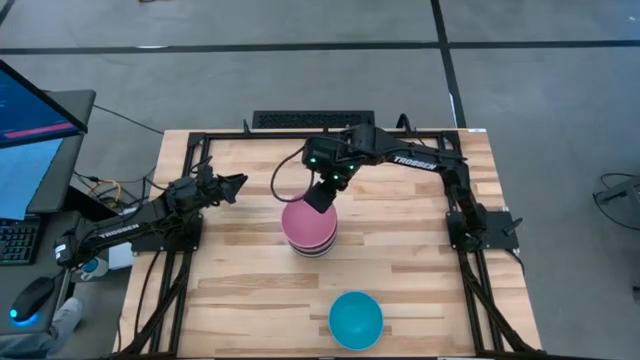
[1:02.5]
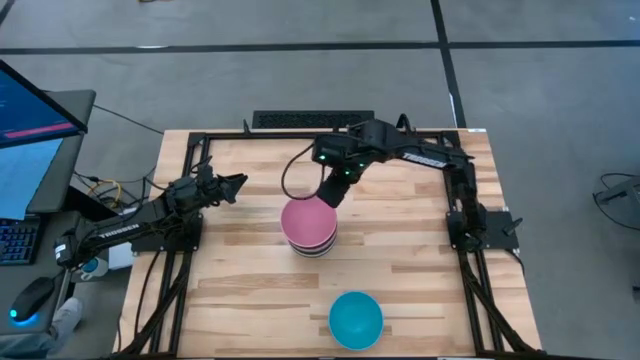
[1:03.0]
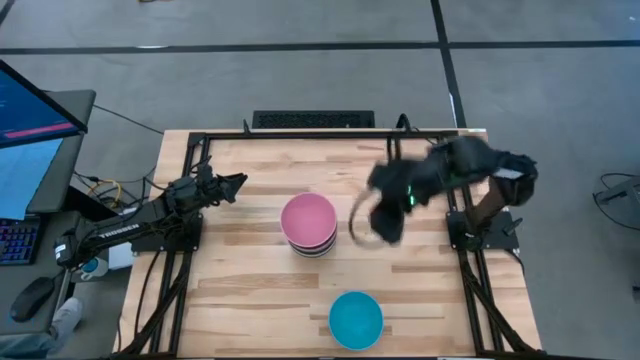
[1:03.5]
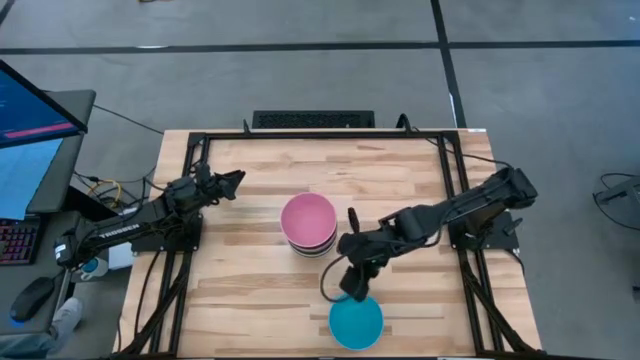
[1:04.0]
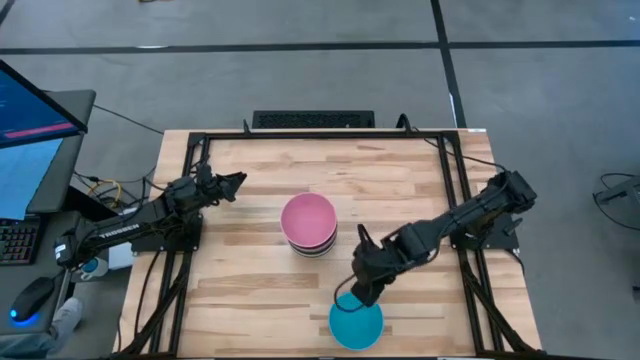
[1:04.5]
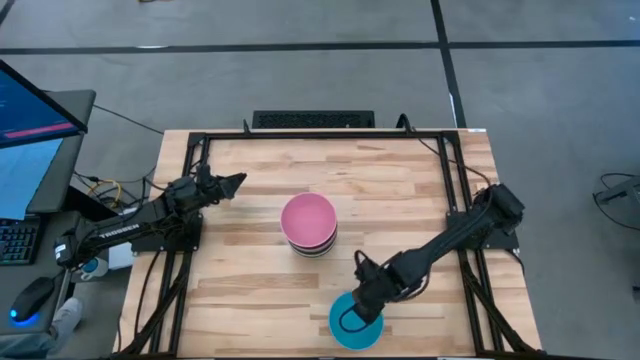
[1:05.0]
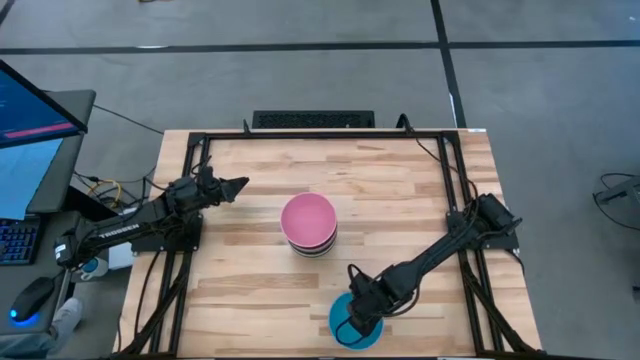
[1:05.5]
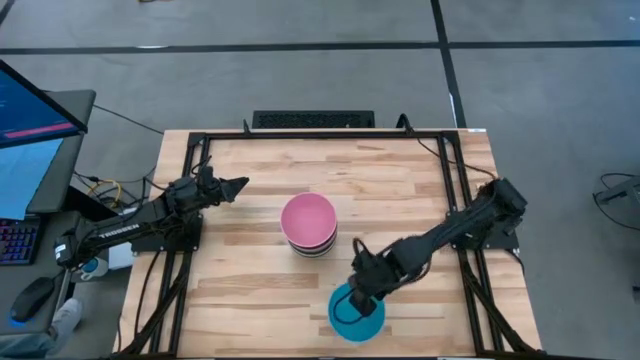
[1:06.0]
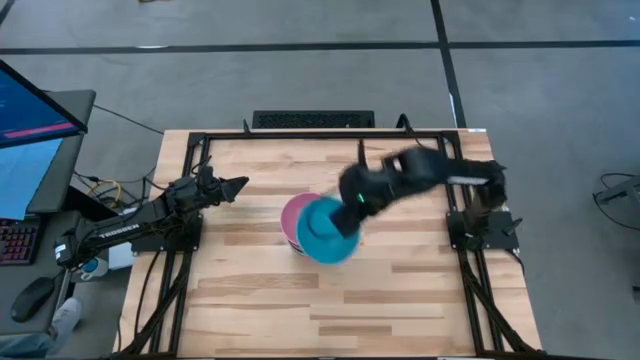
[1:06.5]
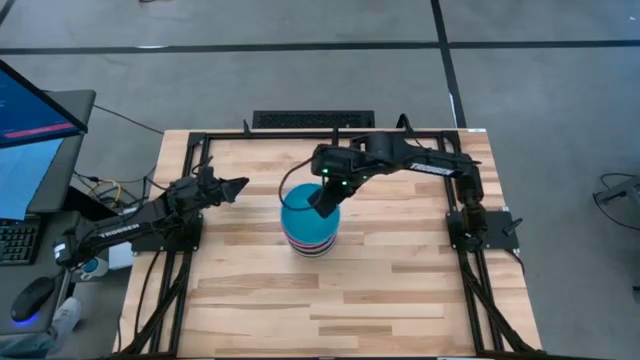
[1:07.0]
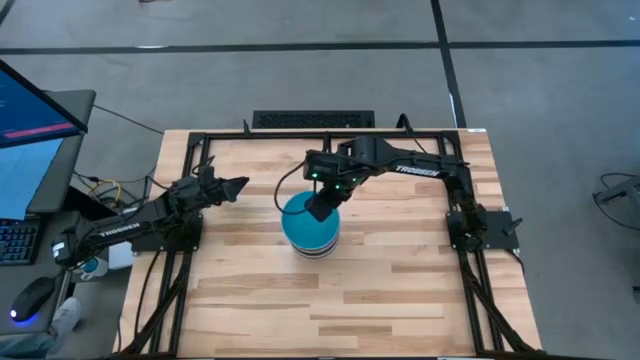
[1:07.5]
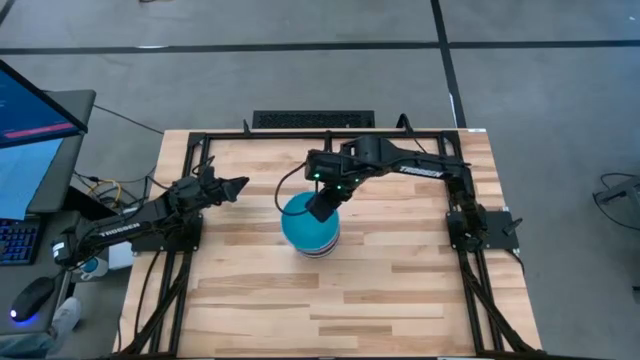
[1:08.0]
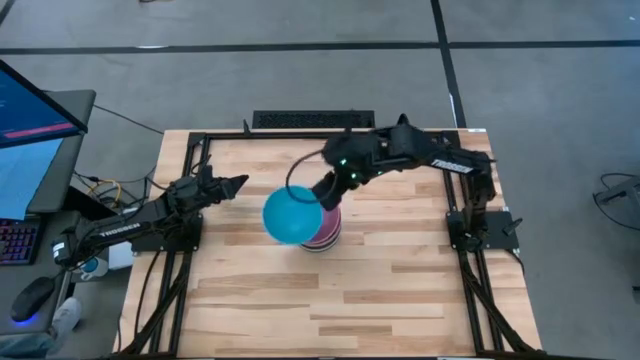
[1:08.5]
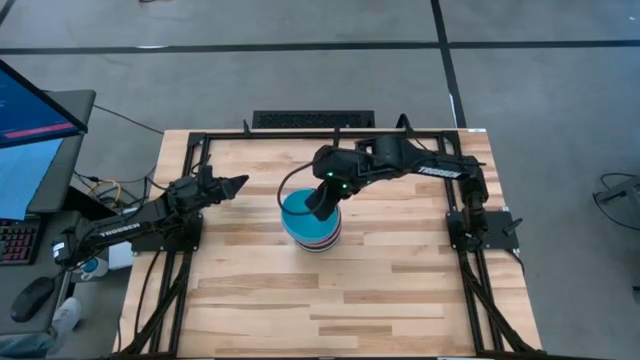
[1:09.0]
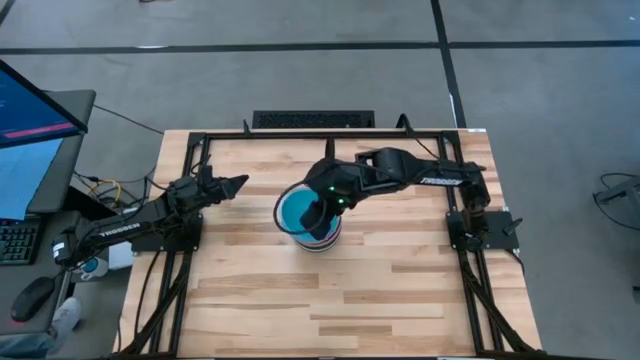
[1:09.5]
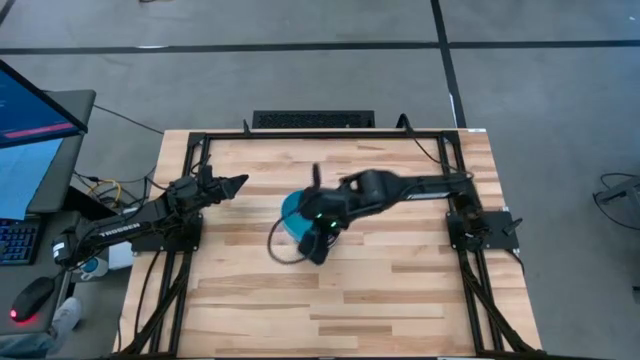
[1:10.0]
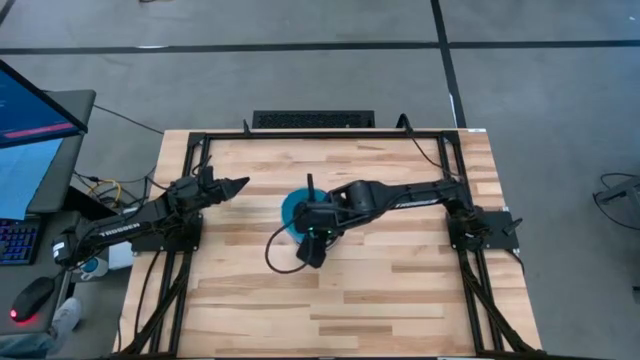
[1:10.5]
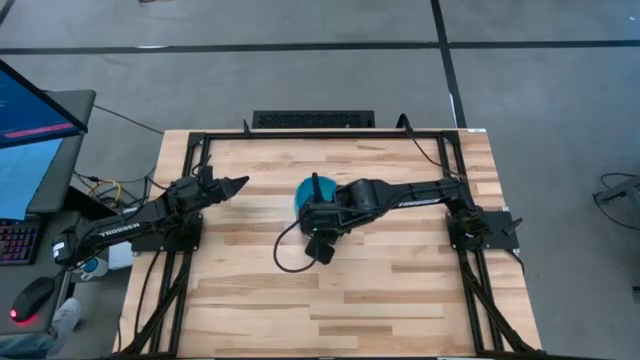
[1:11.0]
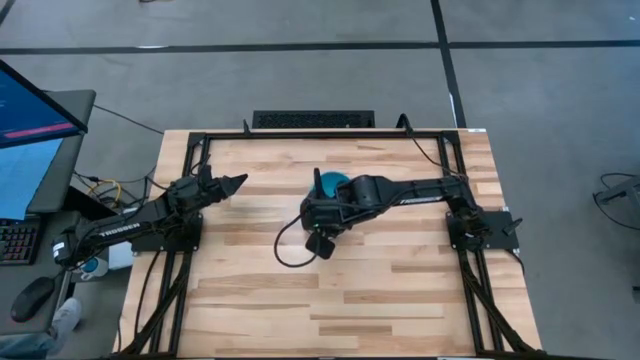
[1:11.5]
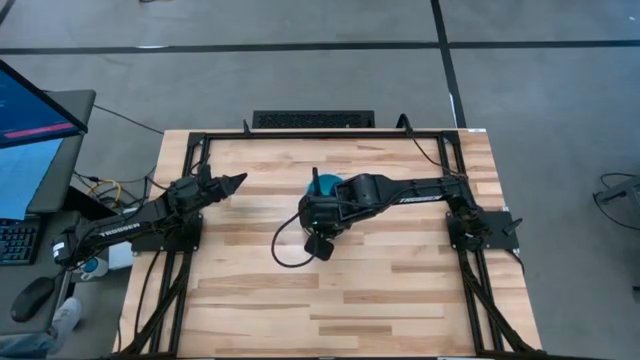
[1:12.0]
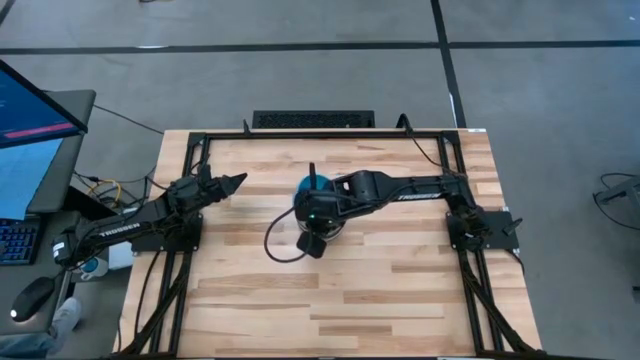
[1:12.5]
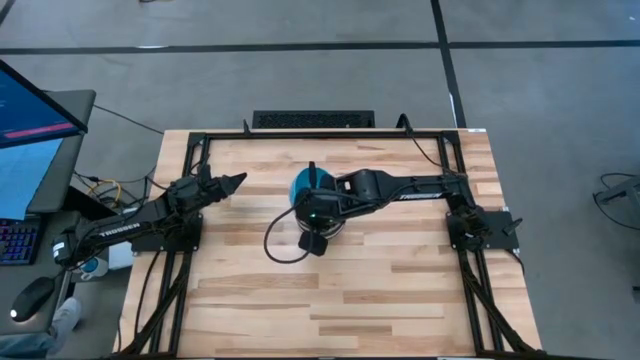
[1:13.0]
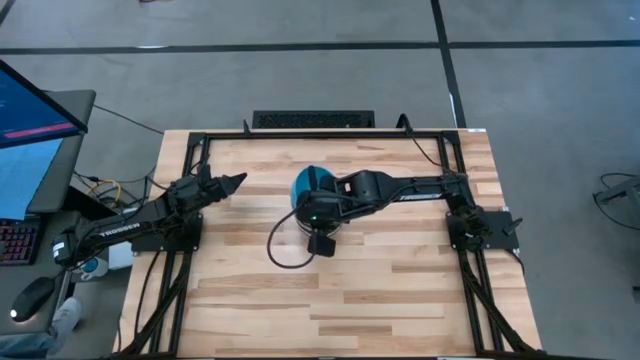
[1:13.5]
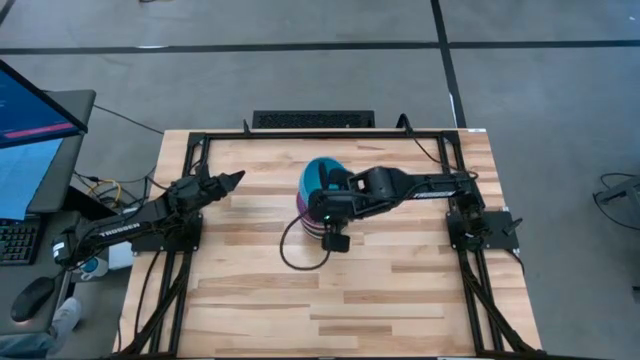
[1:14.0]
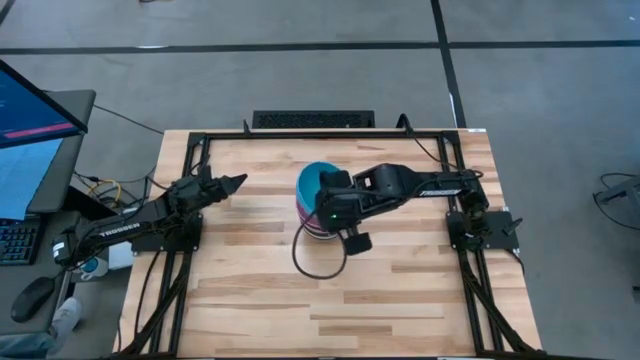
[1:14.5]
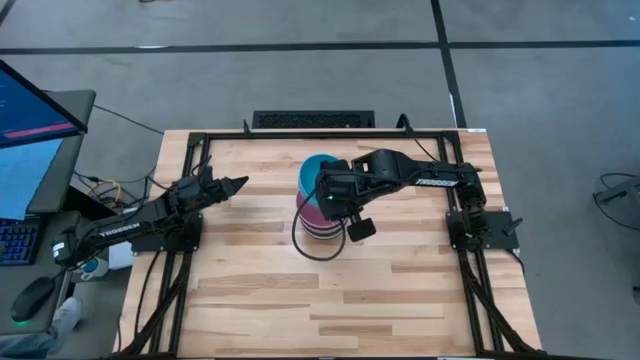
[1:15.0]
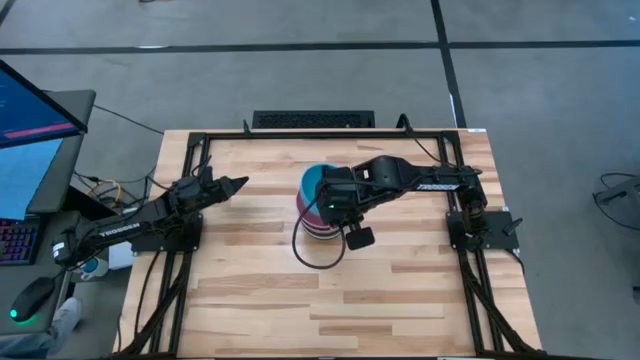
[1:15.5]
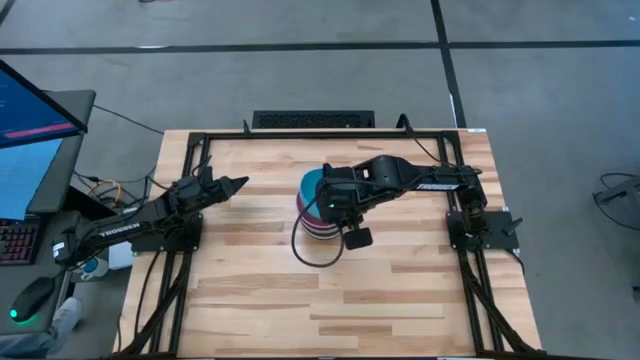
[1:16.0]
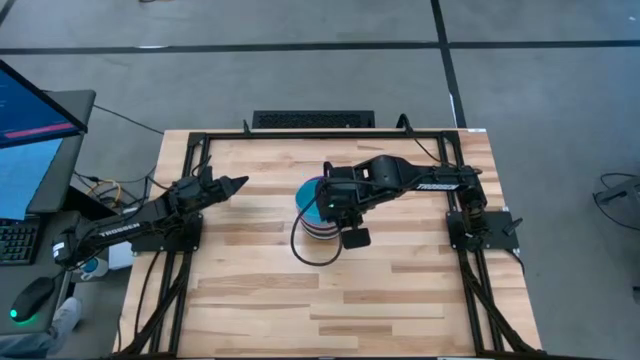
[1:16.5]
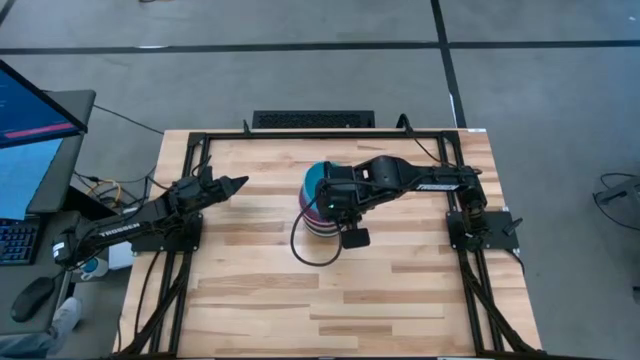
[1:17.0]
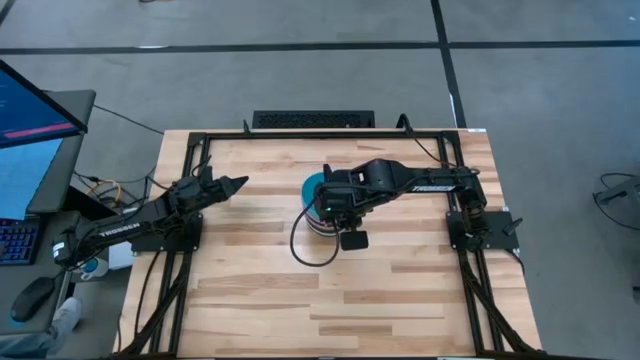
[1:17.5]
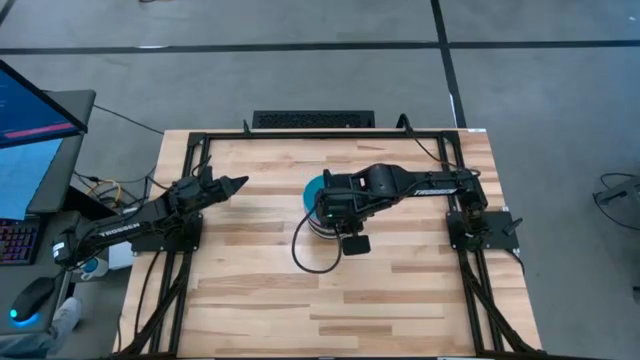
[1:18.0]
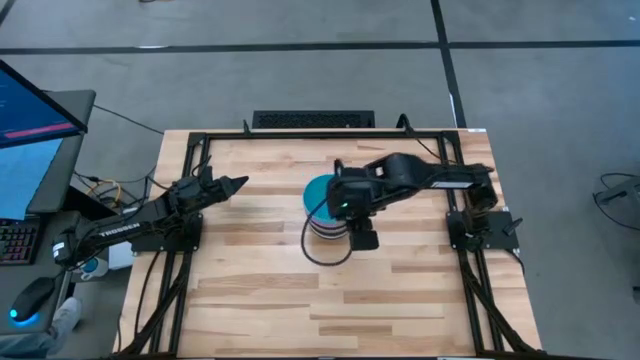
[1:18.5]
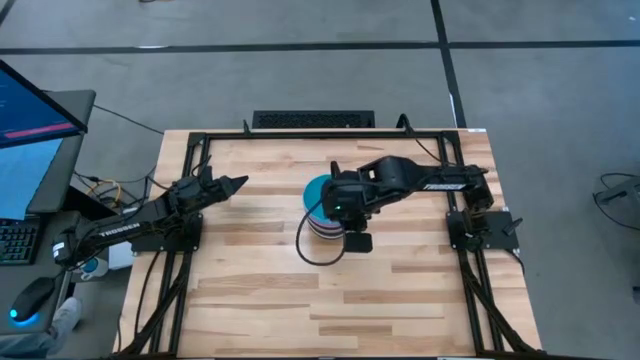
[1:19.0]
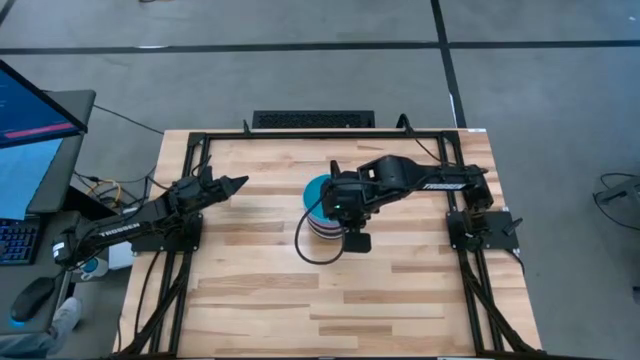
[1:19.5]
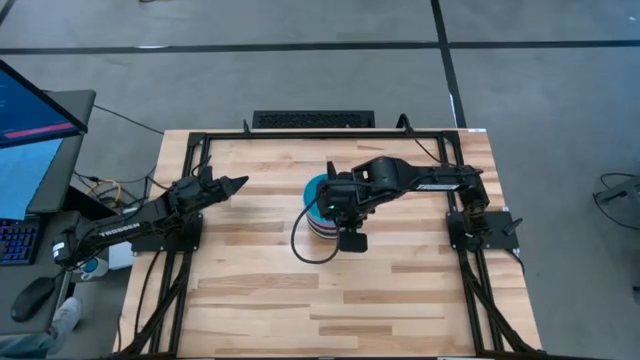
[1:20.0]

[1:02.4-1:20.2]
Task: Nest bowls inside each other
Stack the blue bowl on top of the pink bowl

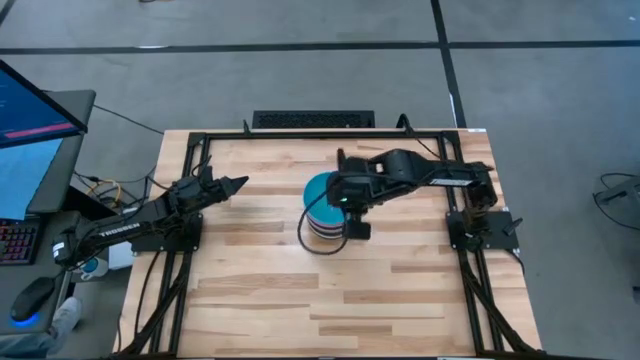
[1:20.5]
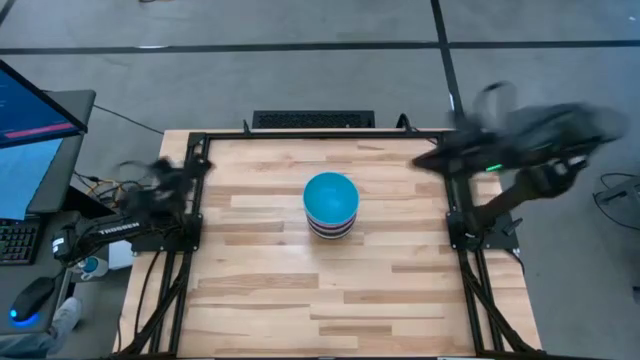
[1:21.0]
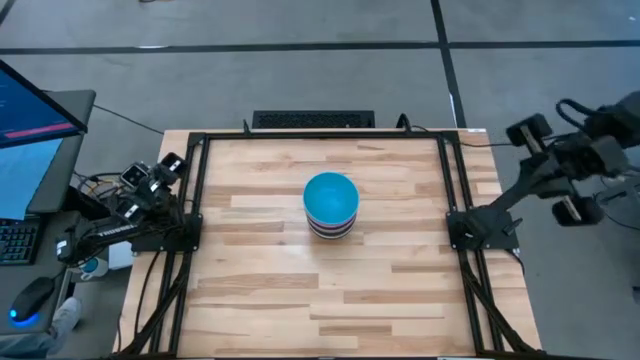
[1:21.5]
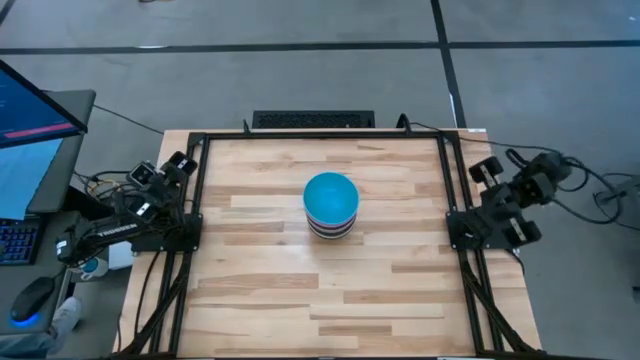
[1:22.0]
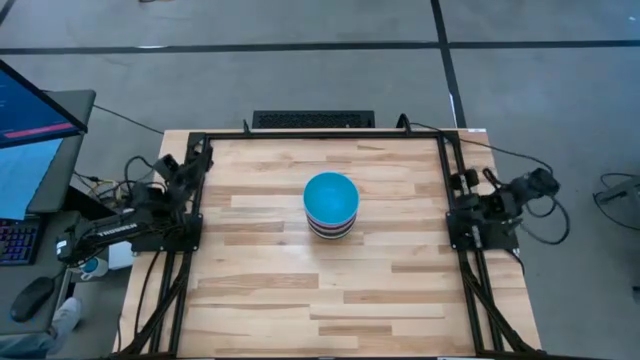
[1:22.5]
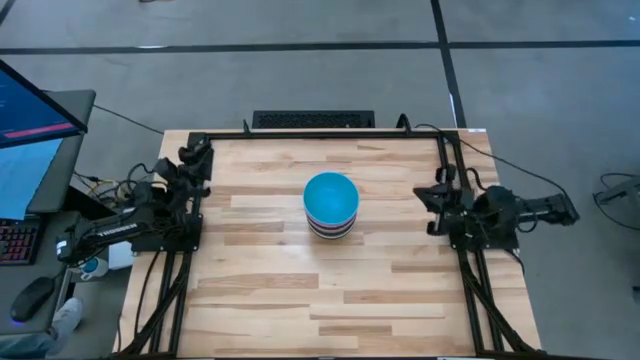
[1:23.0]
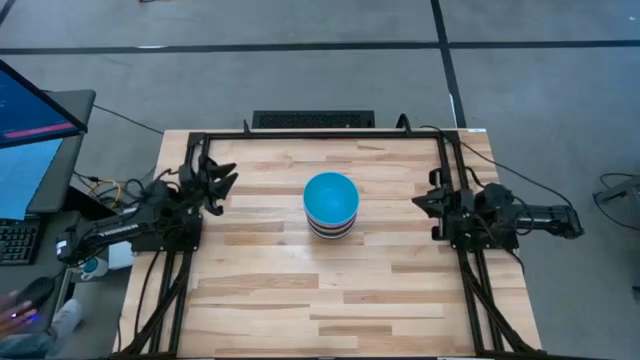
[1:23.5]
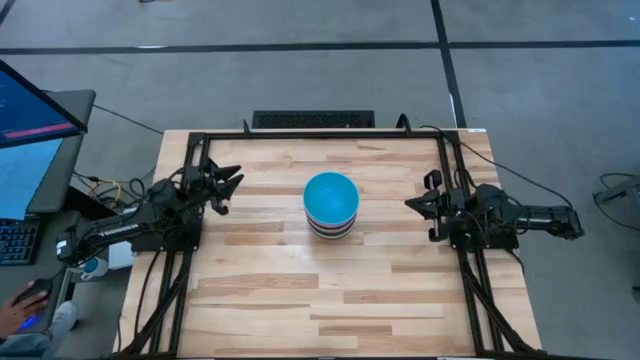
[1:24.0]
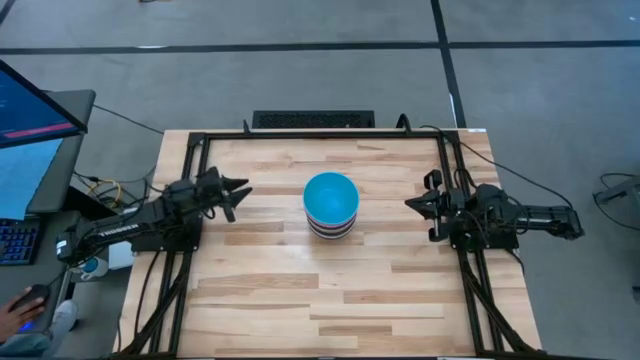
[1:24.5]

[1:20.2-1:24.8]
Return to Home Position
